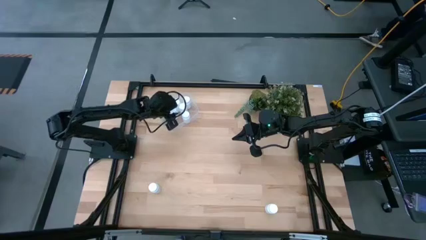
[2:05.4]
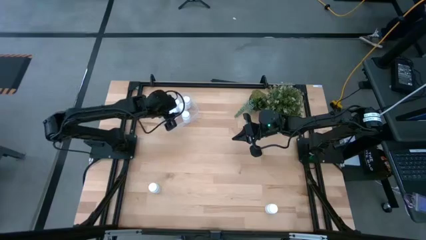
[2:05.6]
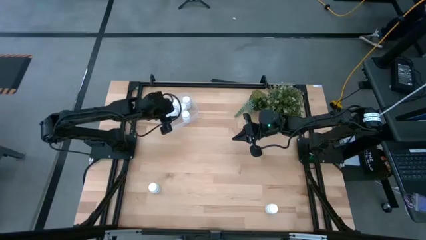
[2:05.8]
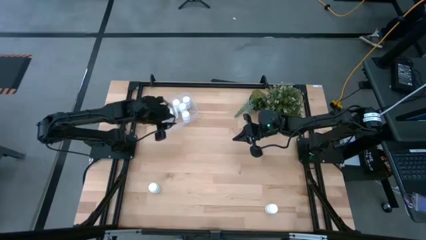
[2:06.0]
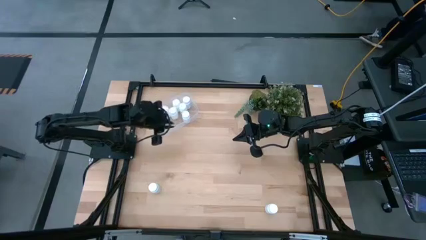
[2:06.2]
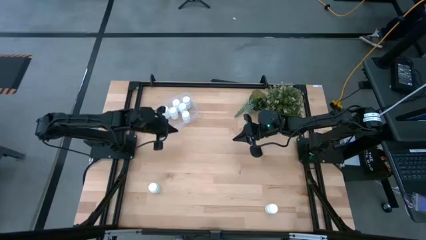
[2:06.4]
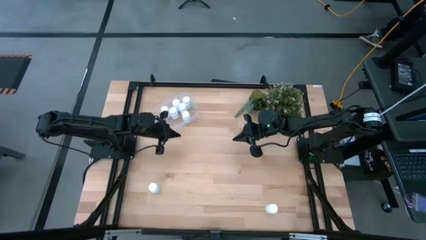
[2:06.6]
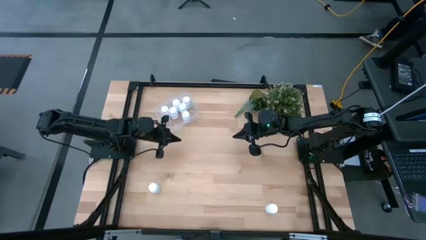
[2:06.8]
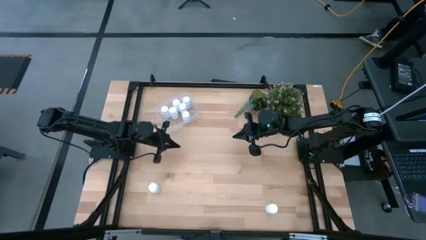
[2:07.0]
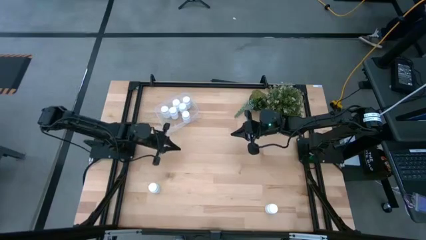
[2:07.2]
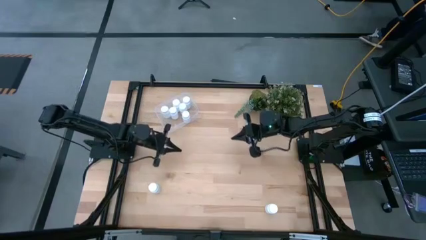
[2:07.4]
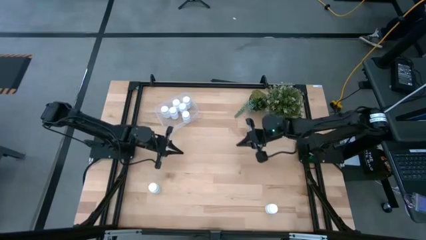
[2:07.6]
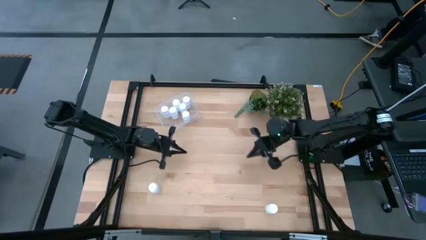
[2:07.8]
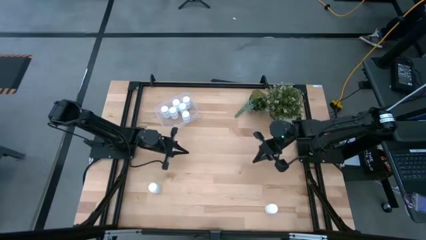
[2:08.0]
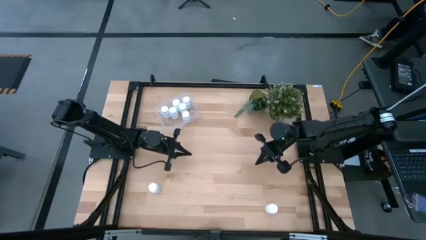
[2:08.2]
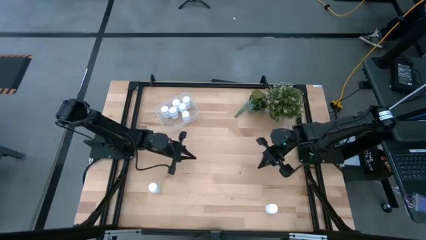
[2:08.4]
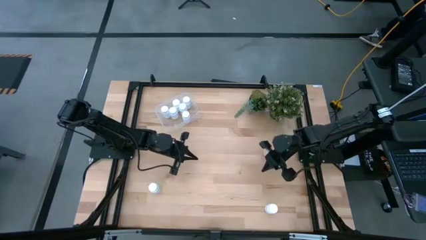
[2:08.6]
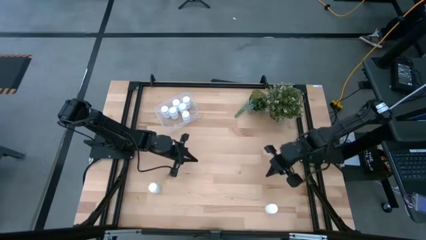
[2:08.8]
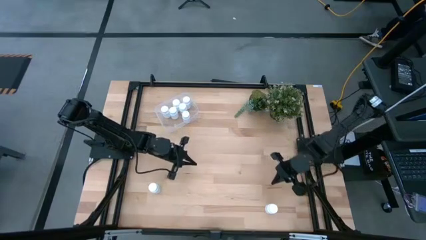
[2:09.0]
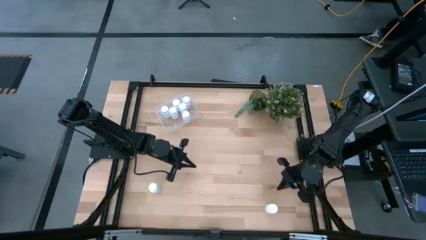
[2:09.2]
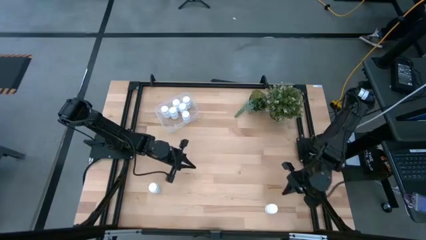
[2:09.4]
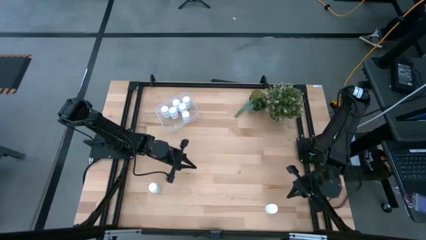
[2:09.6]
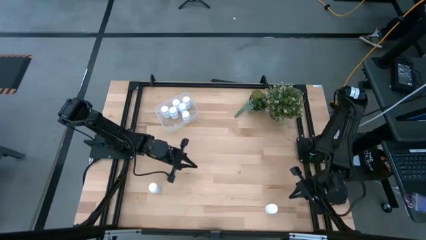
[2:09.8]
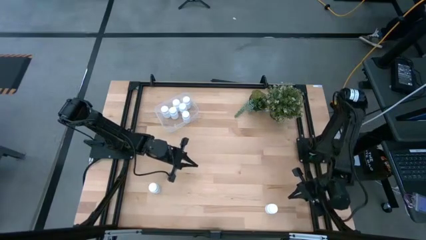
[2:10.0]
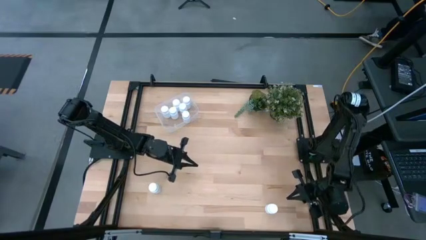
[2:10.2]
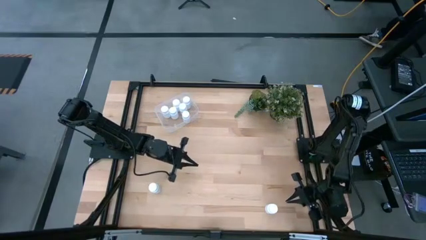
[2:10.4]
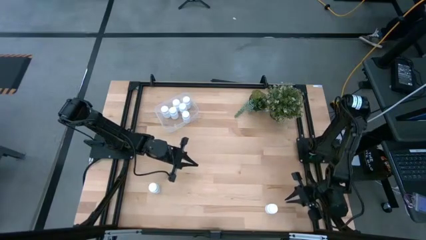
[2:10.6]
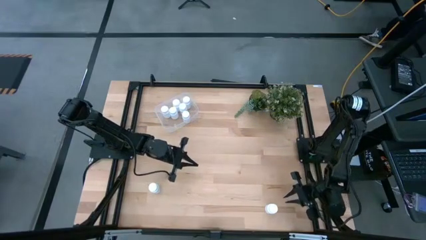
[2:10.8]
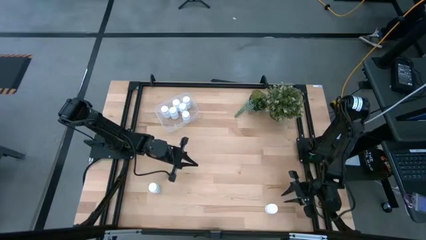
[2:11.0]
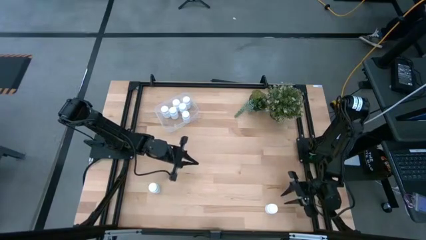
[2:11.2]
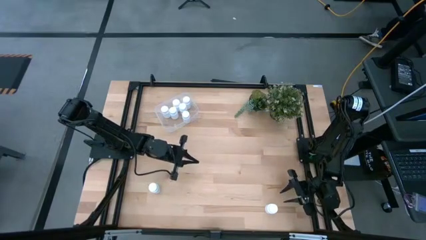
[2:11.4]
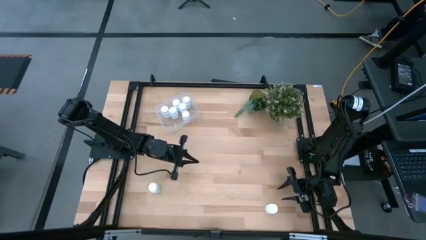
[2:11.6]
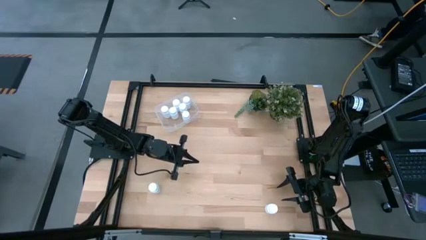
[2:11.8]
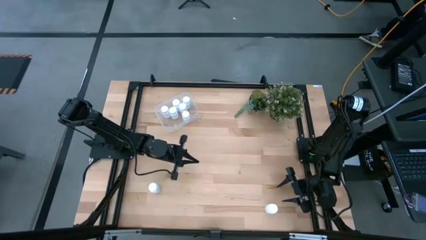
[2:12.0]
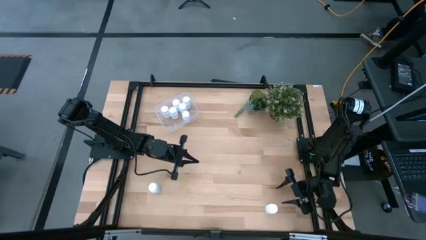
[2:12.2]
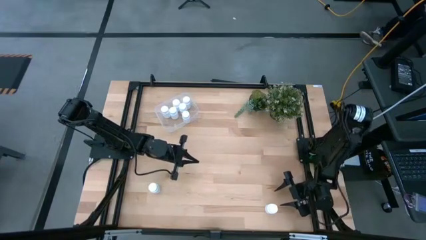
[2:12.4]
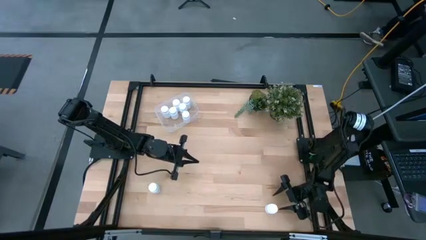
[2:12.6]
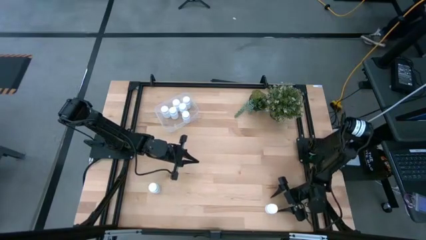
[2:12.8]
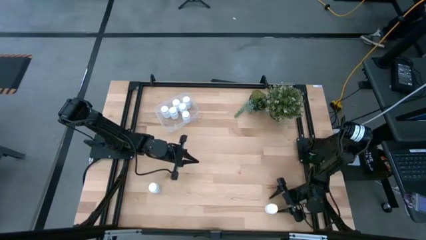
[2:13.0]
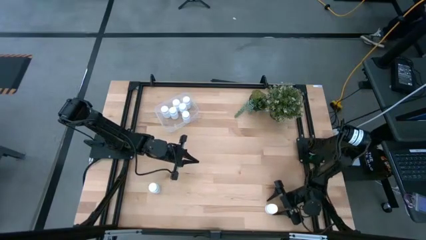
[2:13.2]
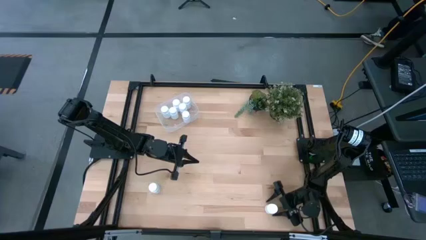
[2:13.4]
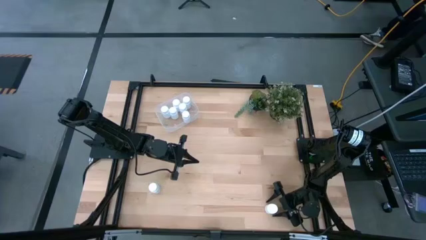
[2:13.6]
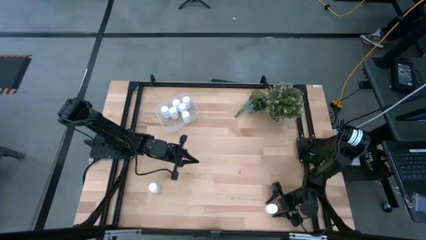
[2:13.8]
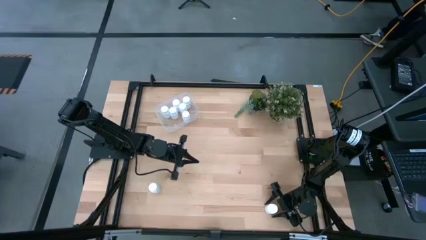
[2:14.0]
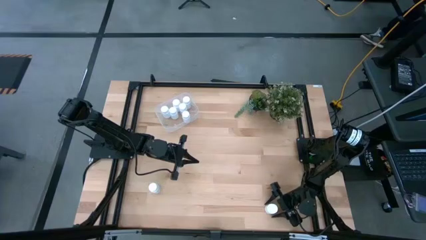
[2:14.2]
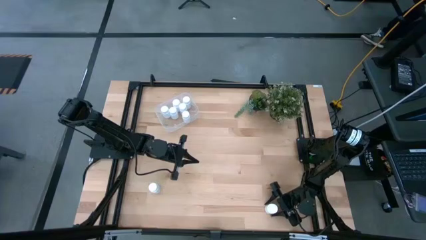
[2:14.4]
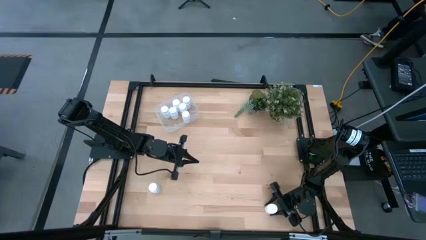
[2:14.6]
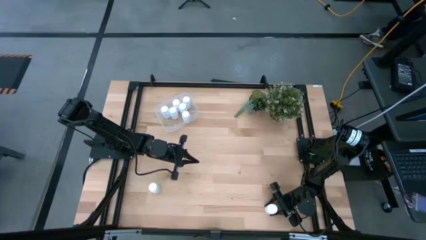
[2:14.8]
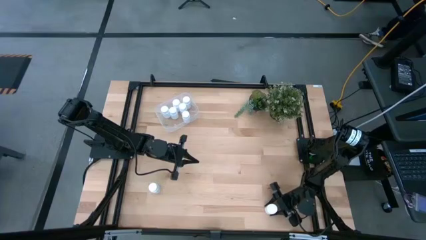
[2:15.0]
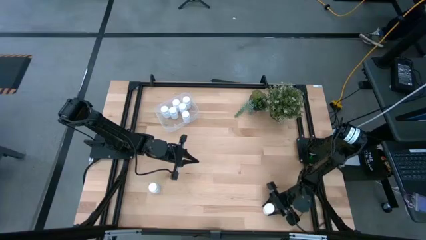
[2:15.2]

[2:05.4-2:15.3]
Task: Pick and place pill bottles into a basket
Put the white medicine bottle into the transparent bin
